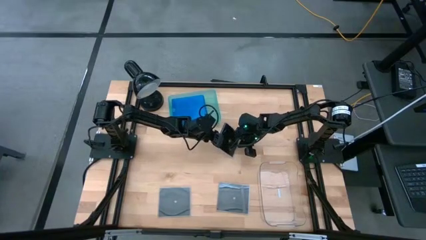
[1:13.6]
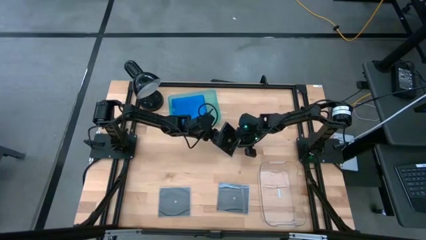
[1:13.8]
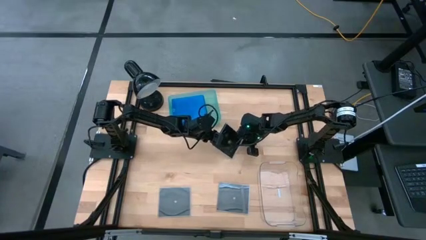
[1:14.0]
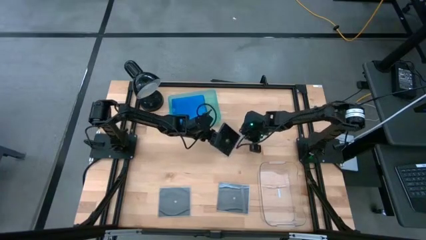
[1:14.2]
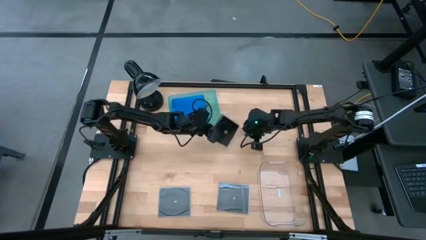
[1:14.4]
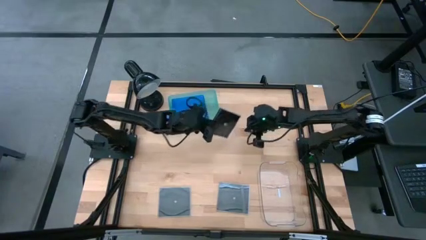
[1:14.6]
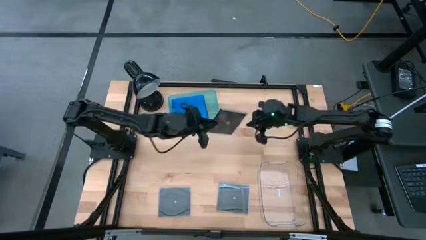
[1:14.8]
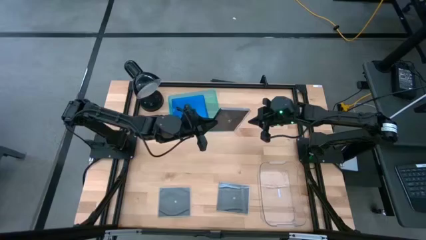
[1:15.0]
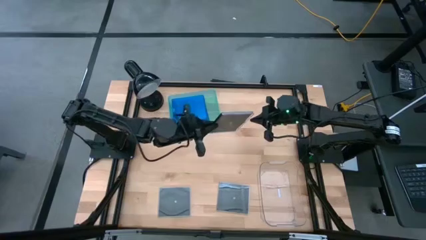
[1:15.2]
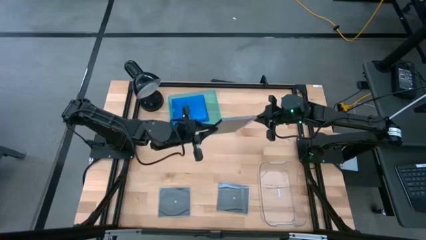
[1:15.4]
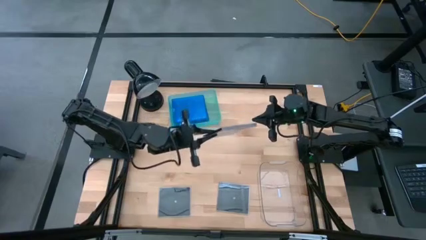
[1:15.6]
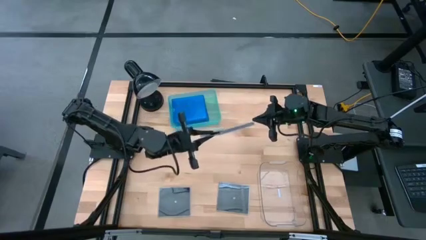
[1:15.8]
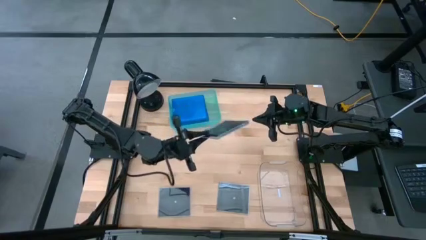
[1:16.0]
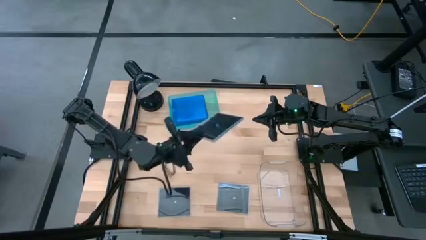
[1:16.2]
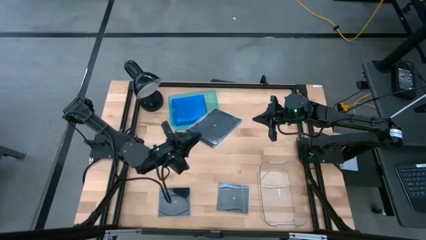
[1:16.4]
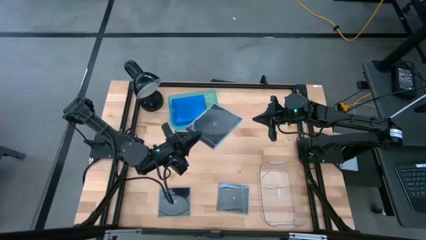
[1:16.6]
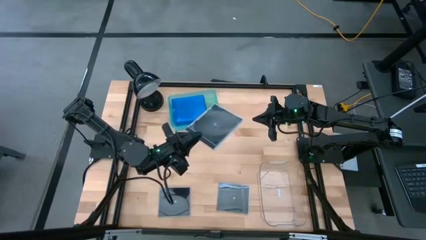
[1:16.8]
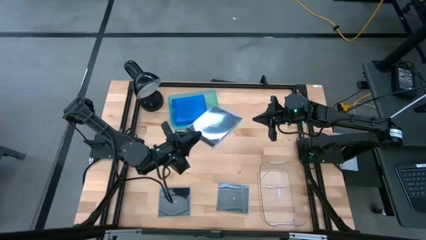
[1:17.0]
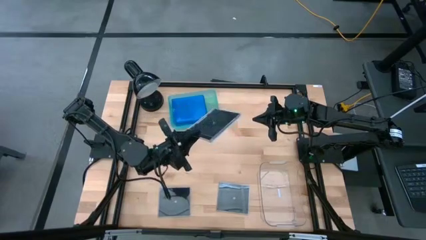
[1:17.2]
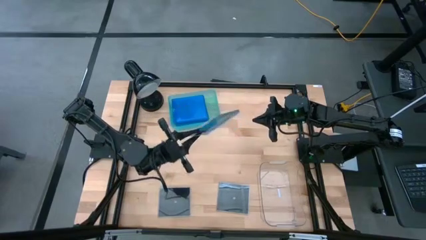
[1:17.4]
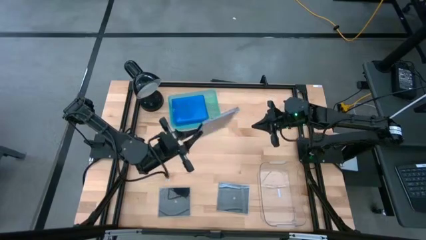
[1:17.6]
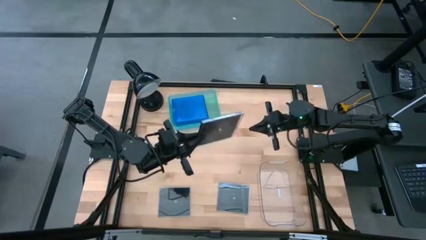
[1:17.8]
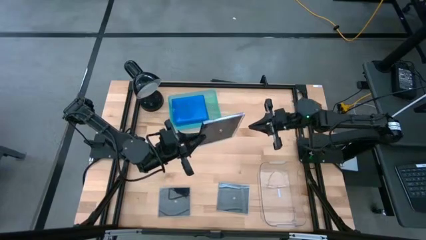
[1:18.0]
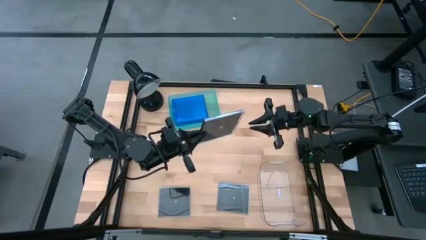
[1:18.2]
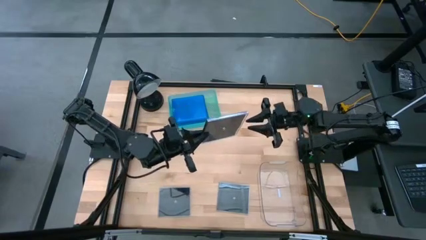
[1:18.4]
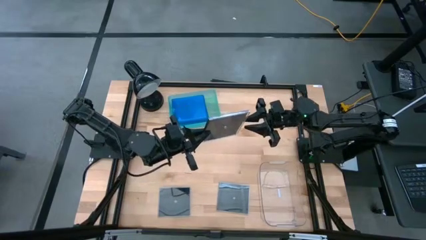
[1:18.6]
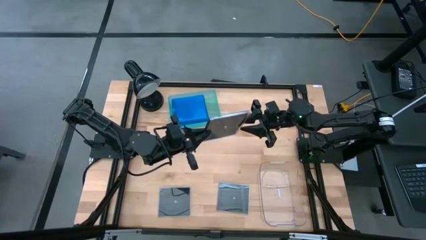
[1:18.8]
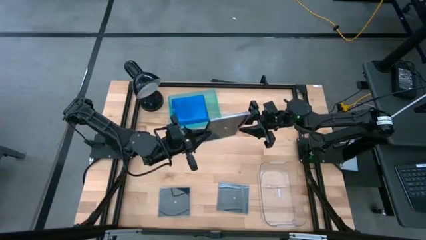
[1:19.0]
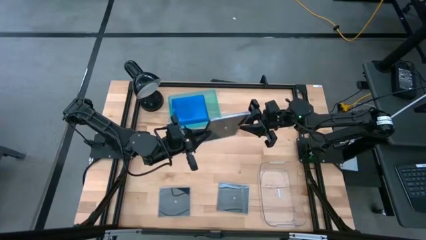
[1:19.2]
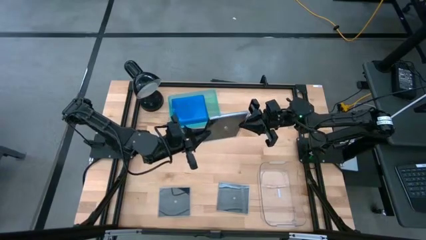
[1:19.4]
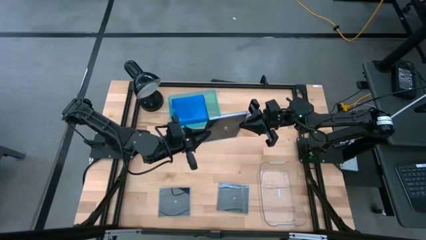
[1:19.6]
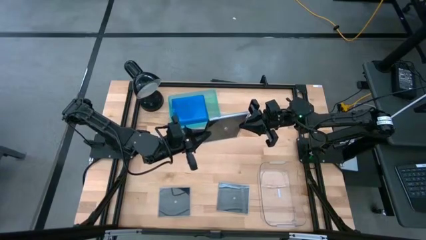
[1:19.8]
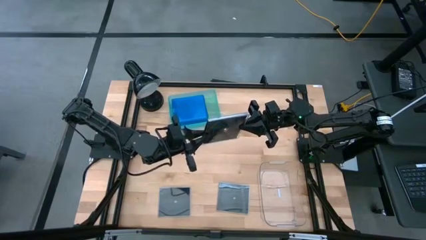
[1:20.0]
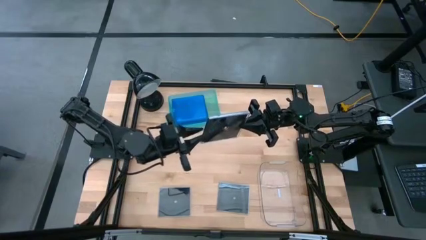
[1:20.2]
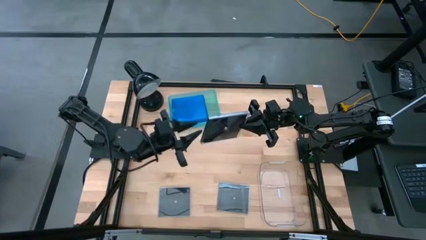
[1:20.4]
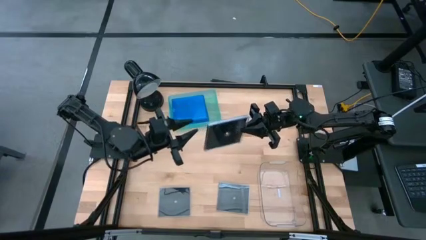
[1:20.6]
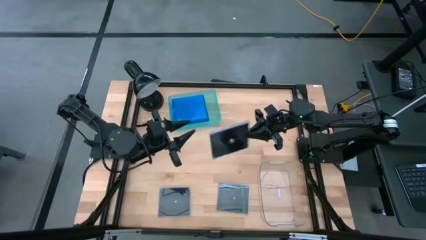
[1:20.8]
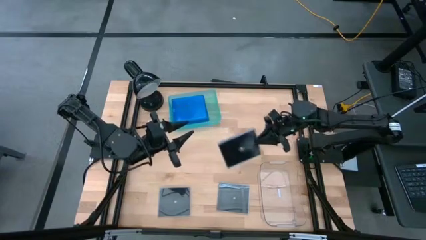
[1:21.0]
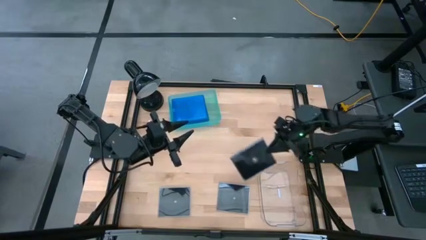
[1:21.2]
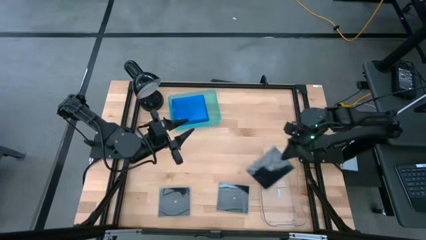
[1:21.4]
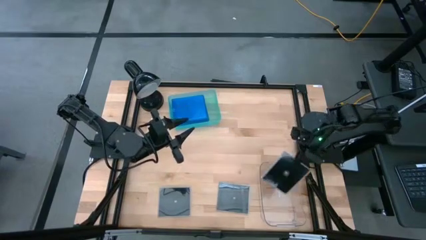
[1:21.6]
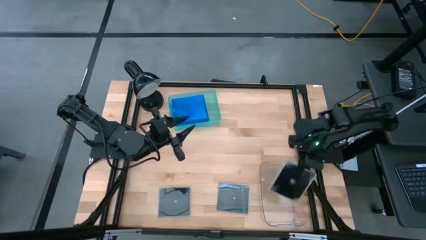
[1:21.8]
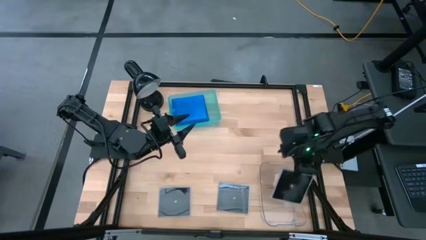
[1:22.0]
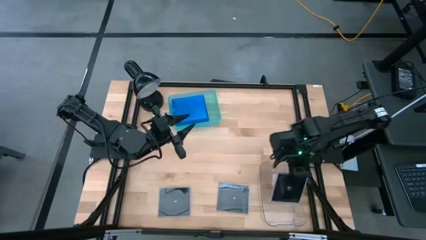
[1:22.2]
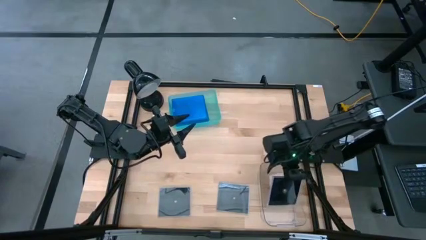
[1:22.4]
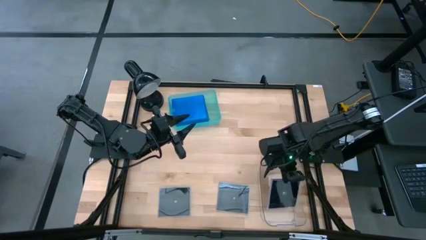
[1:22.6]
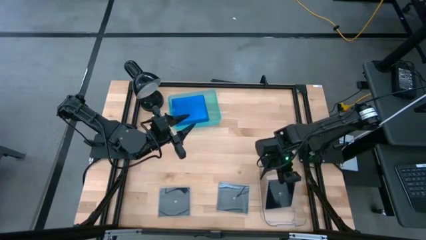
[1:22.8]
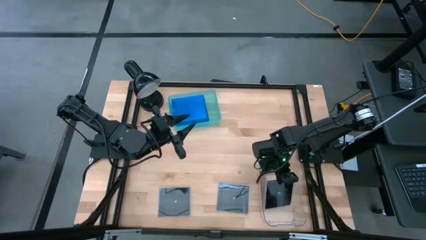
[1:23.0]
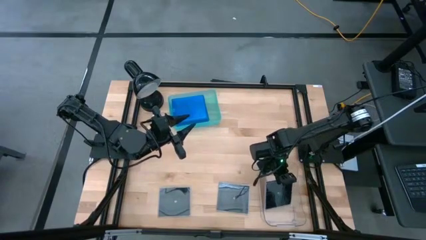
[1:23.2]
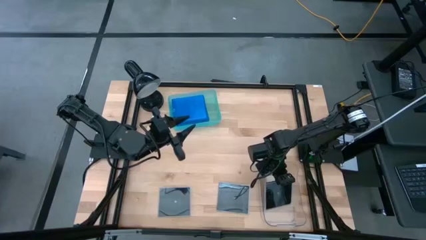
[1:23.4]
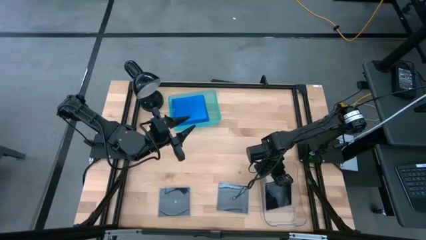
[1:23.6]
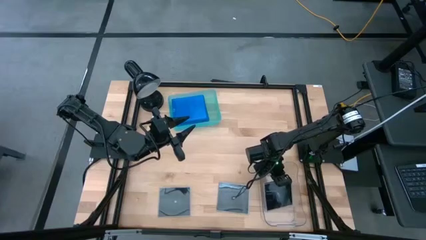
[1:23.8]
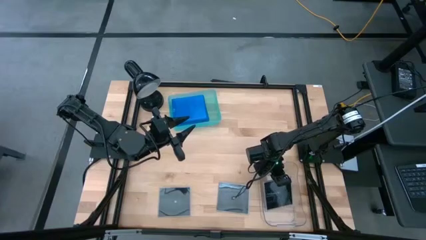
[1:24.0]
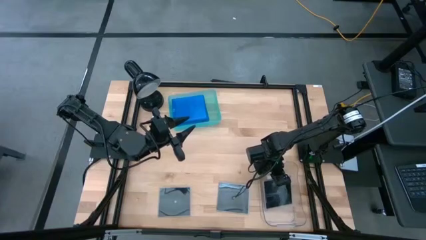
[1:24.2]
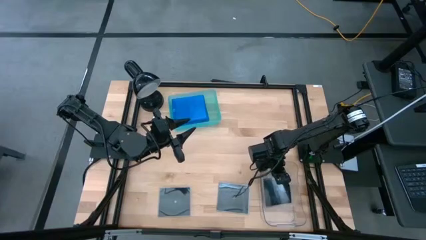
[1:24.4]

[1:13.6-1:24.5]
Task: Pick & place jewel cases by type
Put the top black CD case into the transparent bin

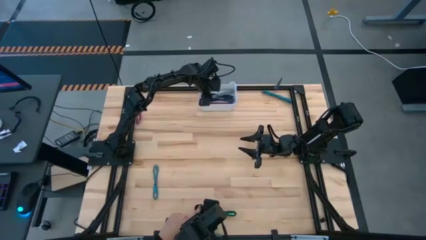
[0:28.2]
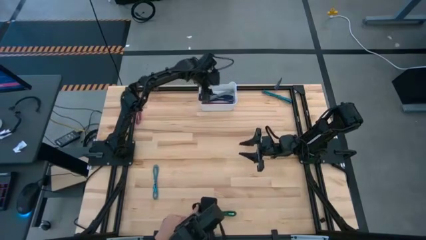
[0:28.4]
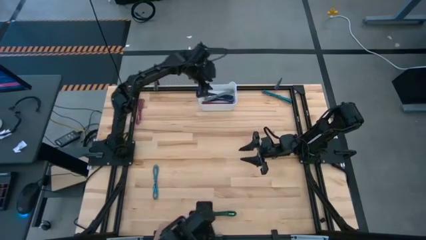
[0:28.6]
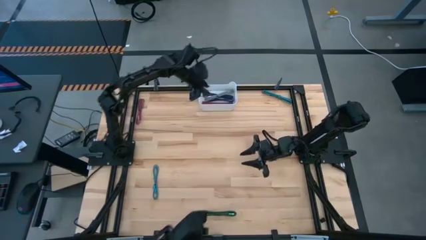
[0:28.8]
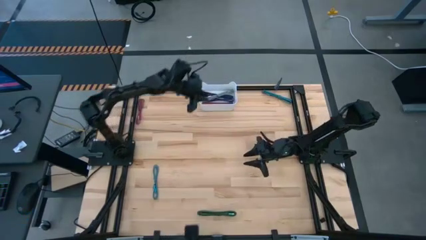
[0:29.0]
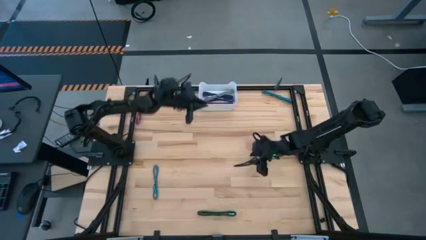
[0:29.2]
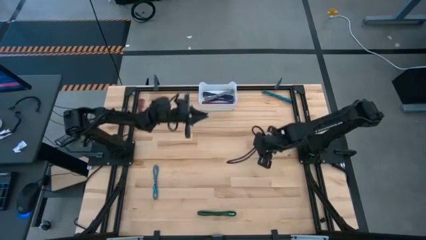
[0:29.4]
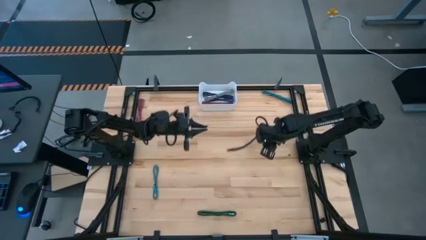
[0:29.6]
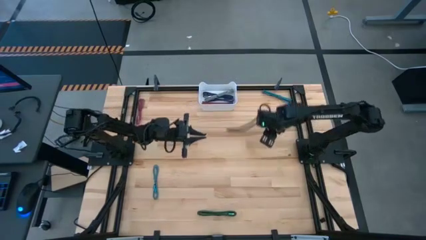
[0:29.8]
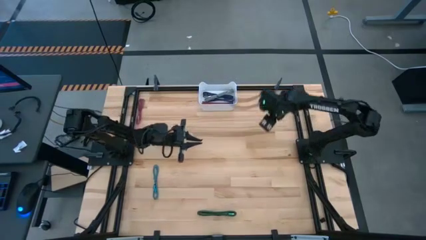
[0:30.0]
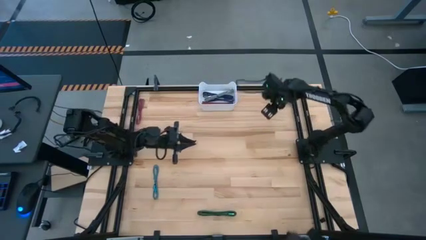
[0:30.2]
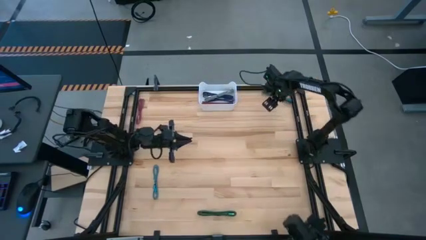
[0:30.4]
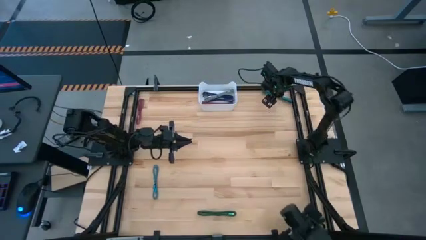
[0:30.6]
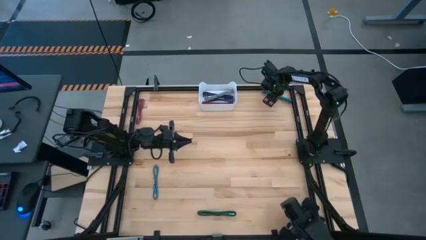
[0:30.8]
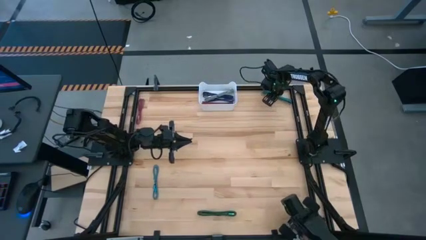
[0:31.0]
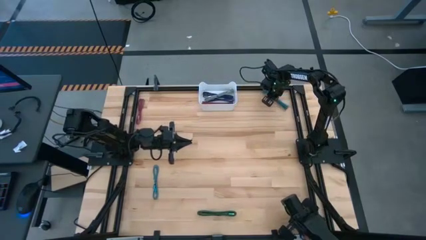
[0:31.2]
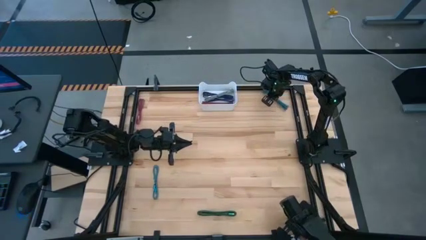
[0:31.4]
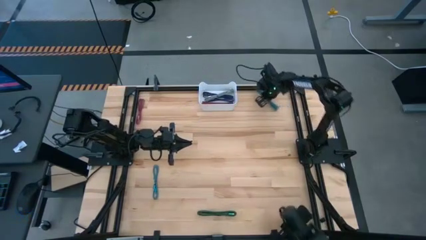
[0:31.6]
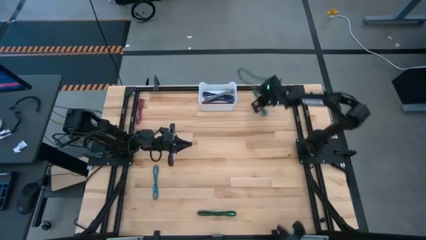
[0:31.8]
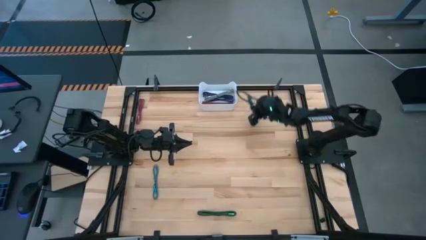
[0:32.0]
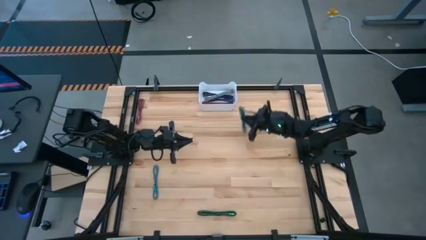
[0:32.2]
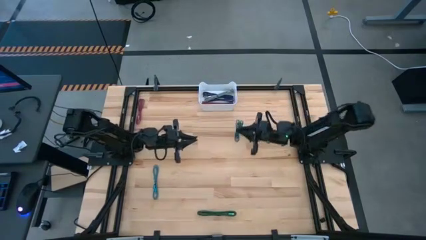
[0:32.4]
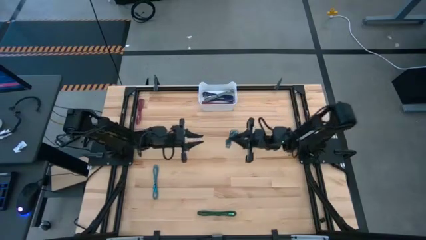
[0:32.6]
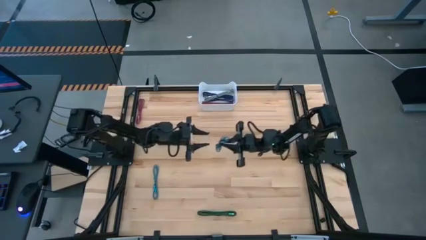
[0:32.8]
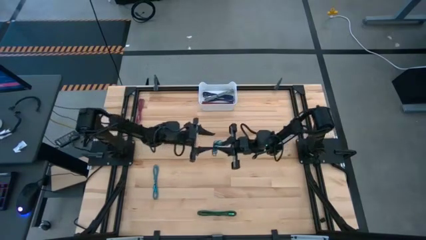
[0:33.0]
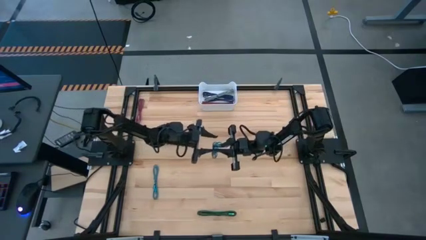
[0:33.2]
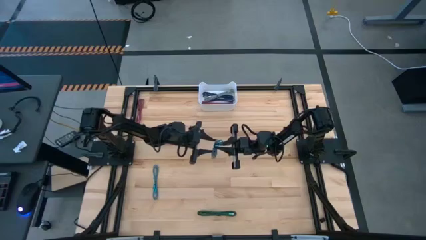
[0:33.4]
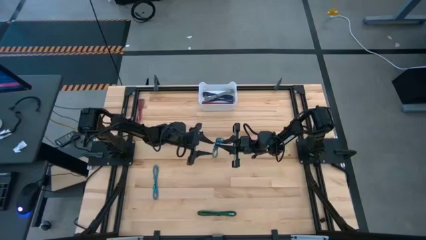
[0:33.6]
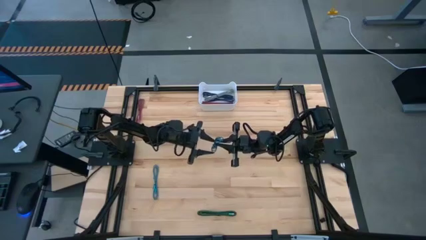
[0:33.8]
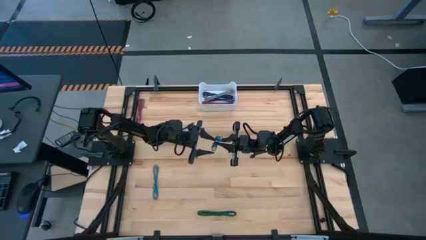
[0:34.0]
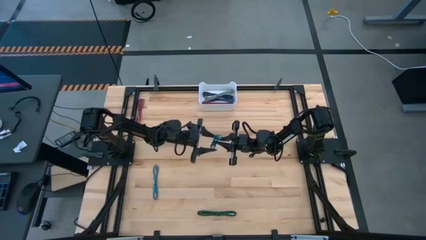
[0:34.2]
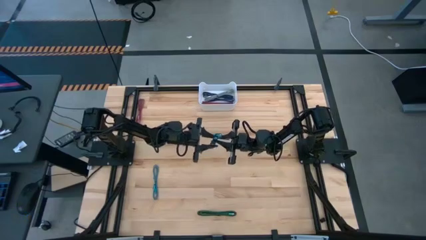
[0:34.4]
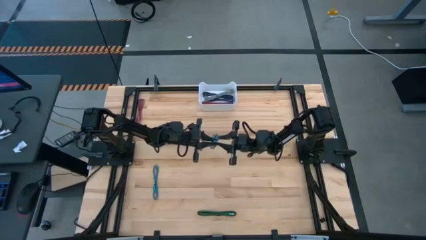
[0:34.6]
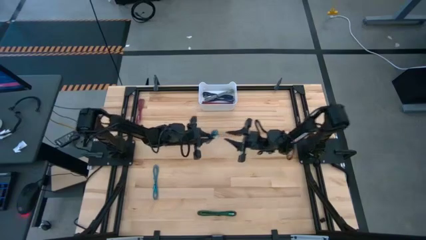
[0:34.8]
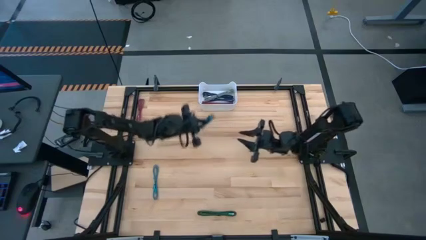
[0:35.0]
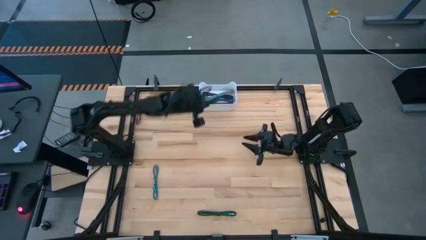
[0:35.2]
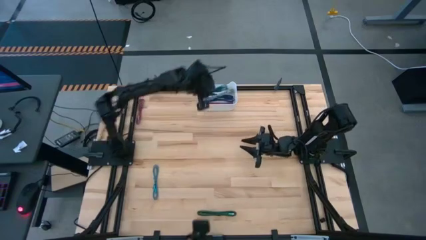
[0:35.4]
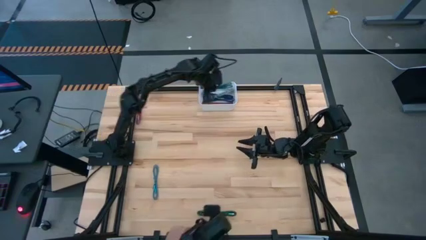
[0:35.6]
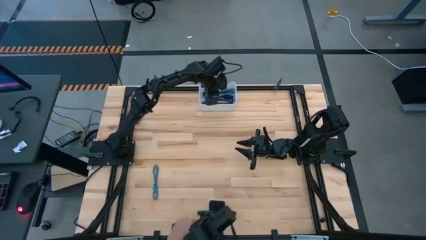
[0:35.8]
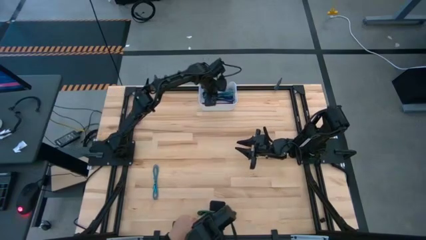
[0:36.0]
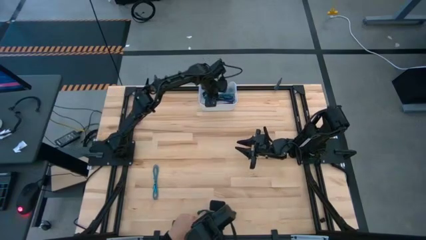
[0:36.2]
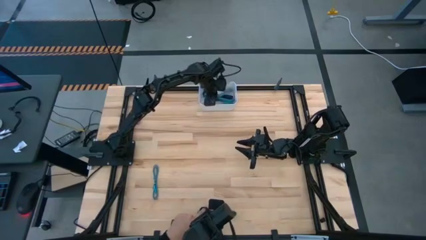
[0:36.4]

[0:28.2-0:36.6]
Task: Pick and place USB-C Cables
Put the top light blue charger cable into the white bin
